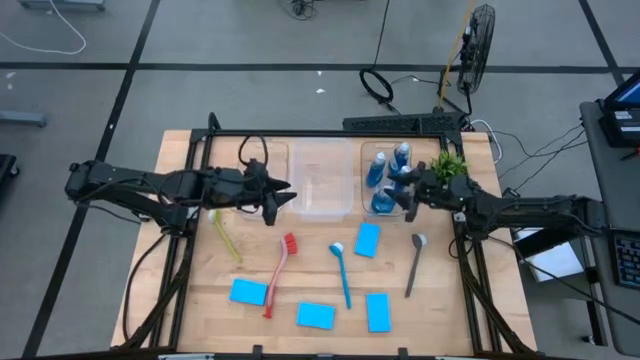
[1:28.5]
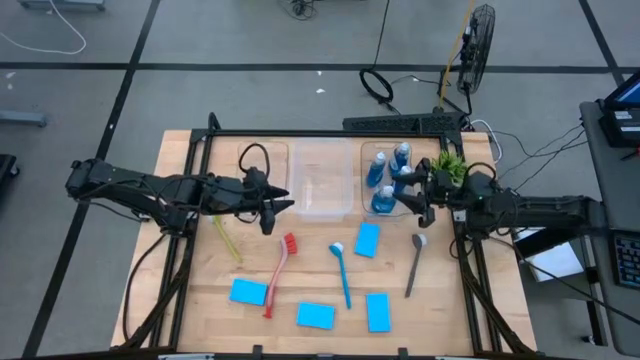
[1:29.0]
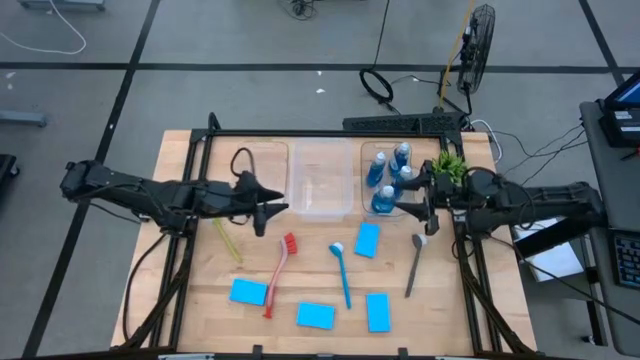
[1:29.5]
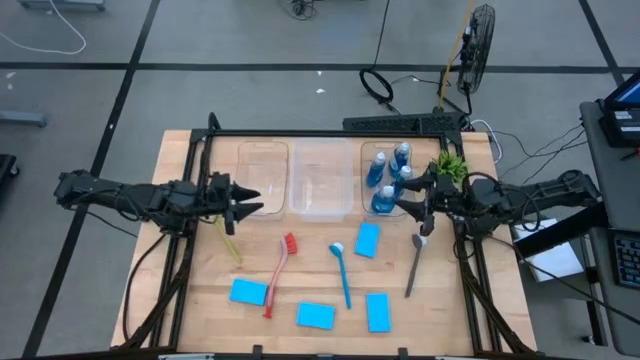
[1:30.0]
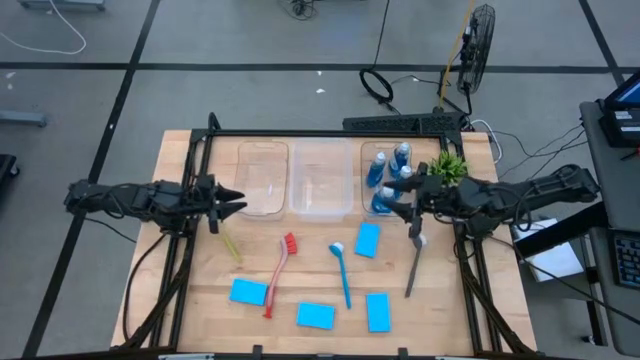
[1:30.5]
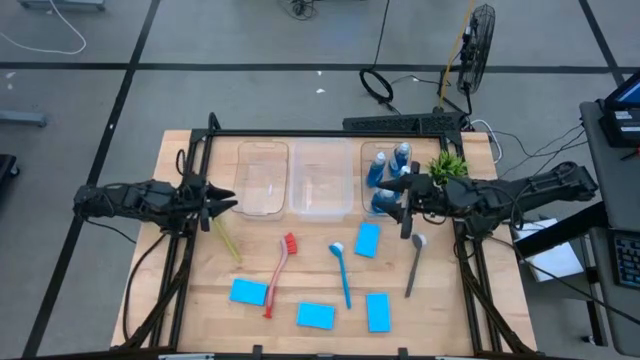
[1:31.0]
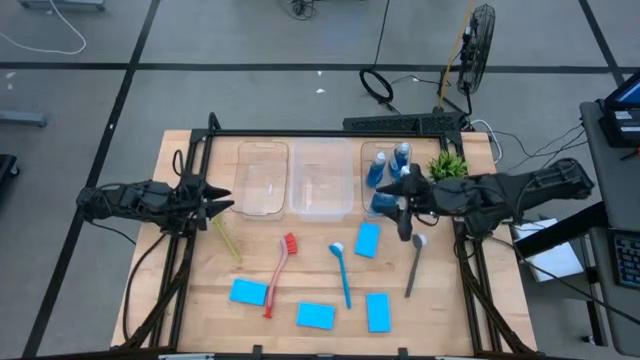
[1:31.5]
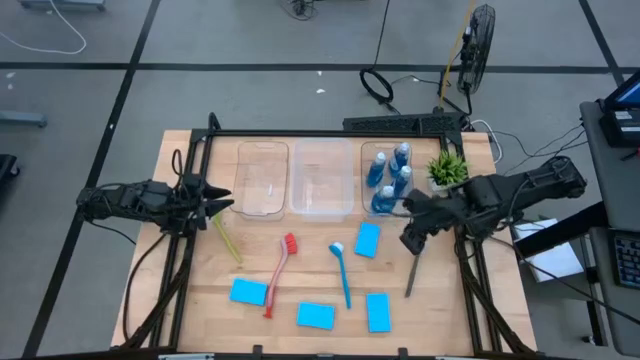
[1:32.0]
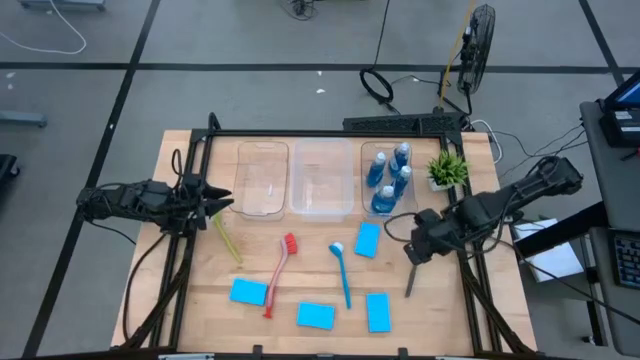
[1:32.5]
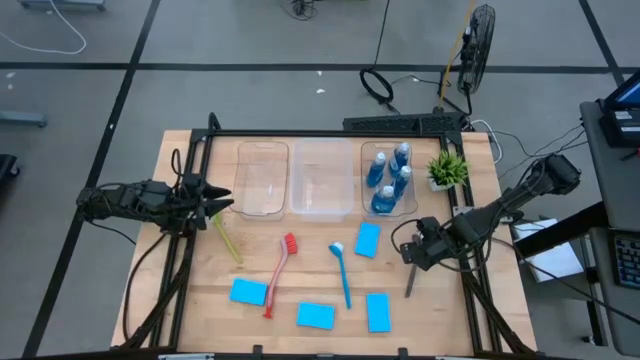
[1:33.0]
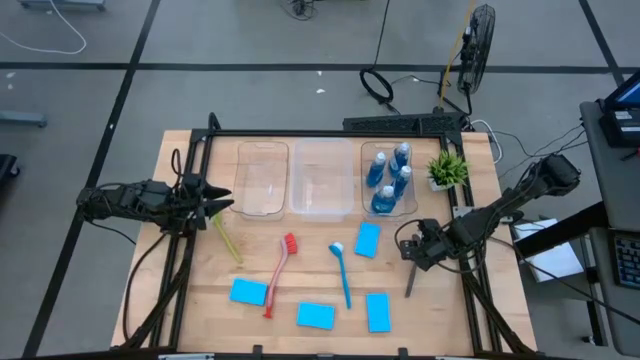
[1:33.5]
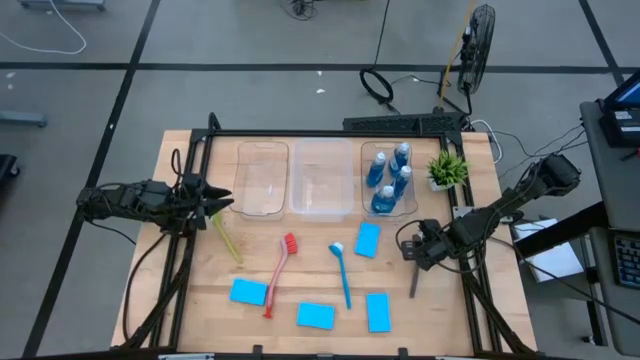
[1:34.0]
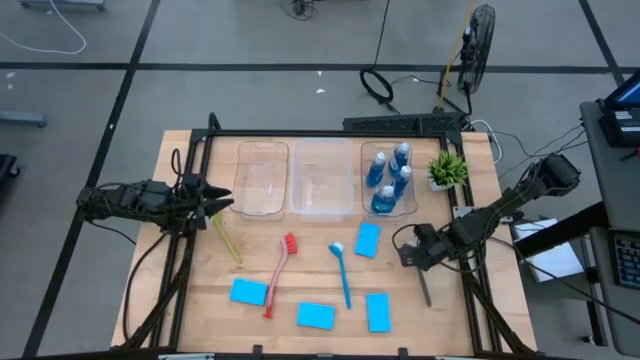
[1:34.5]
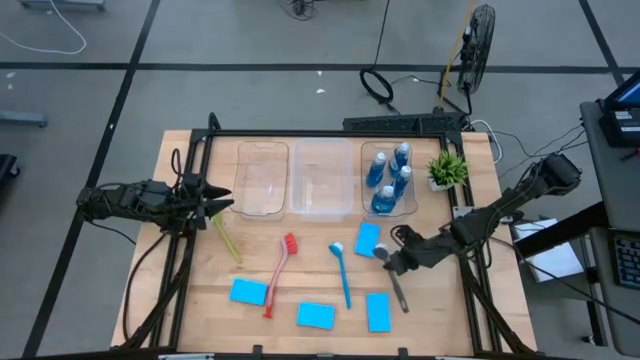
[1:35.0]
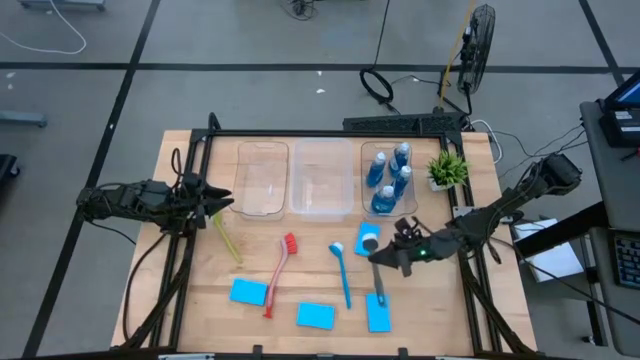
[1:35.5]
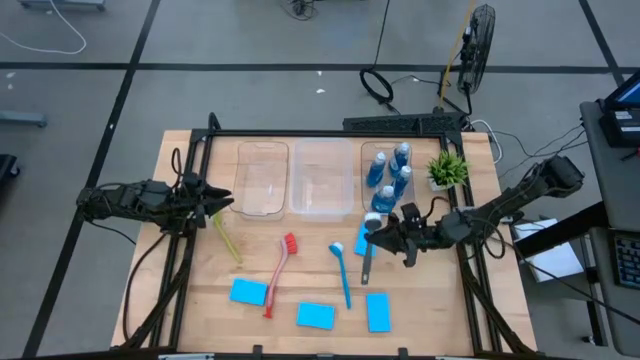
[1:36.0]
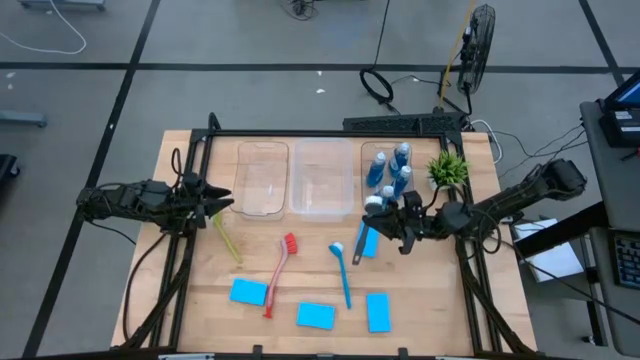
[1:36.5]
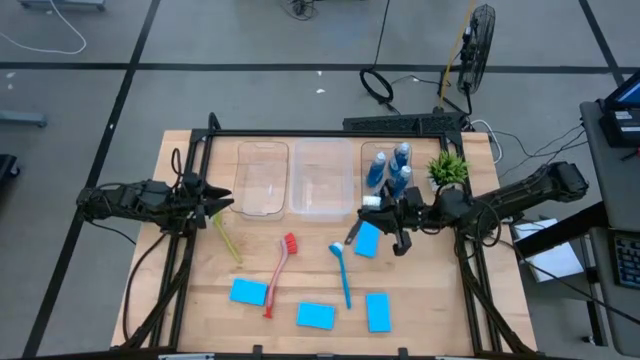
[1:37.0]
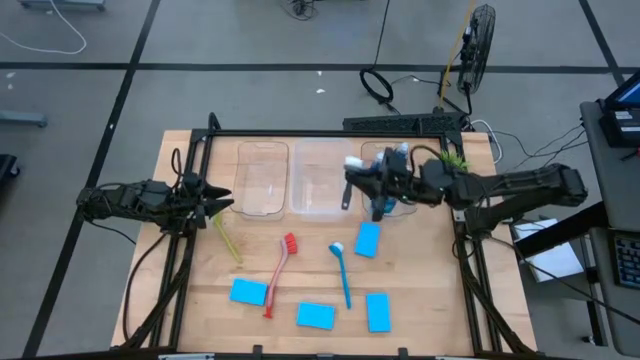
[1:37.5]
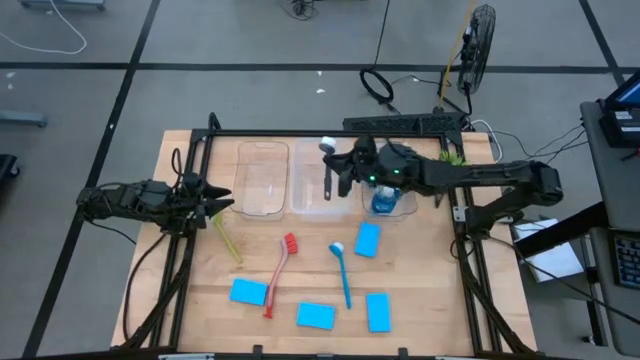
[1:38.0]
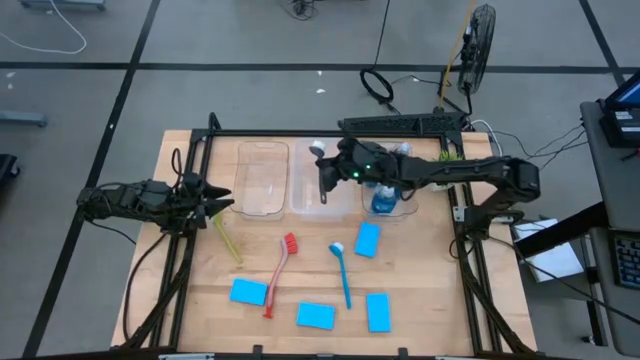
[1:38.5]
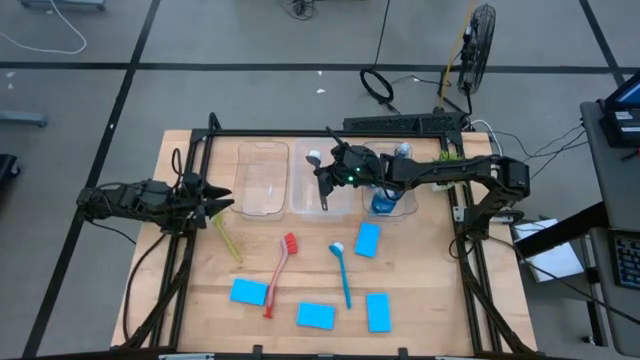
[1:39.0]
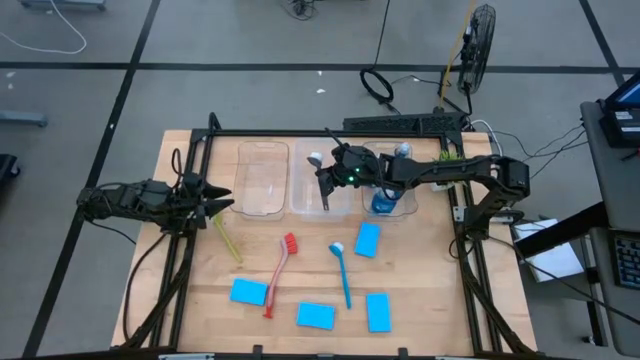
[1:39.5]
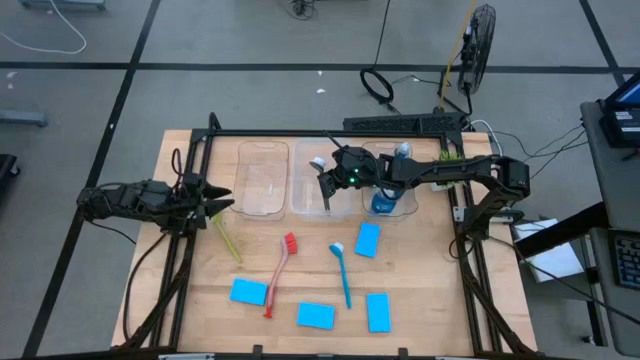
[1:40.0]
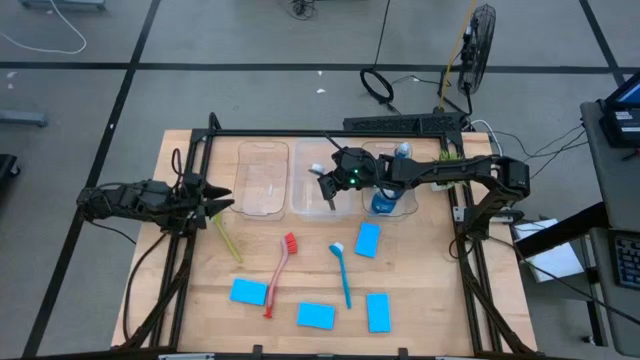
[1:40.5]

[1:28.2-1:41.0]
Task: Pick & Place Kitchen Sink Supplies
Put the black dishwashing brush into the transparent white bin

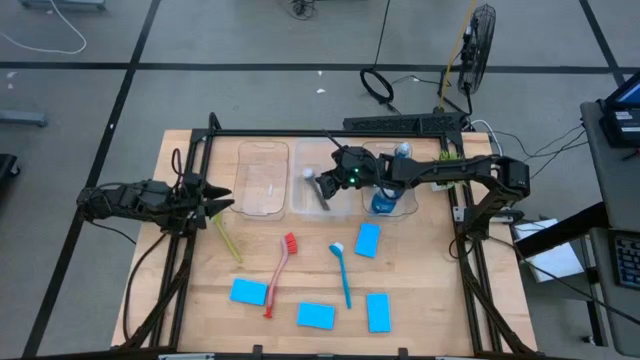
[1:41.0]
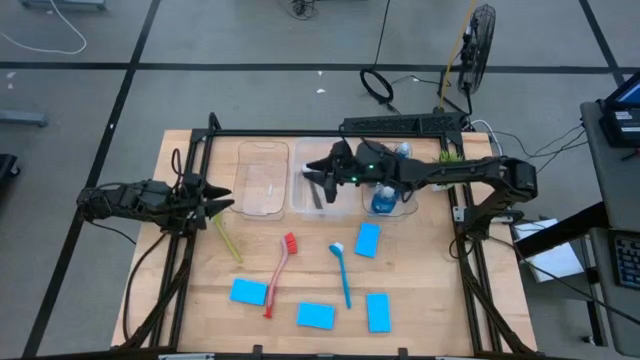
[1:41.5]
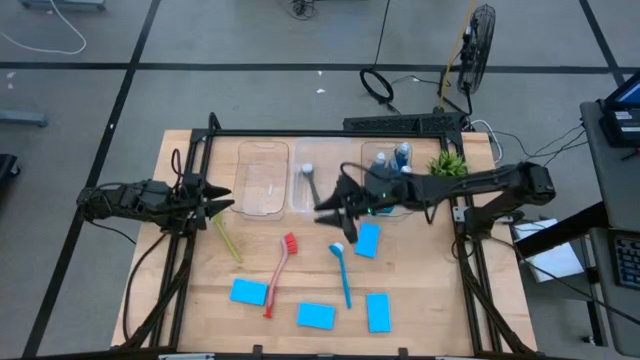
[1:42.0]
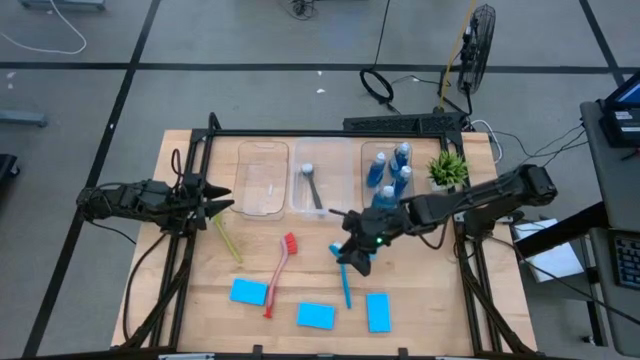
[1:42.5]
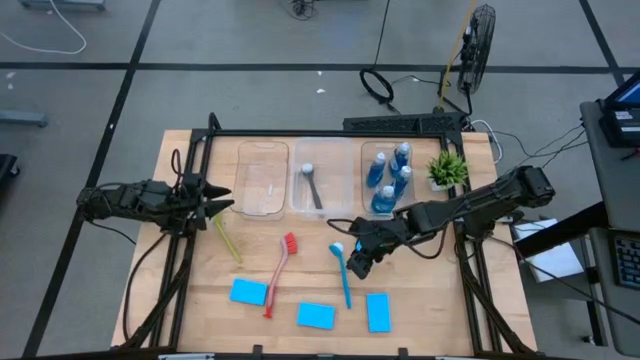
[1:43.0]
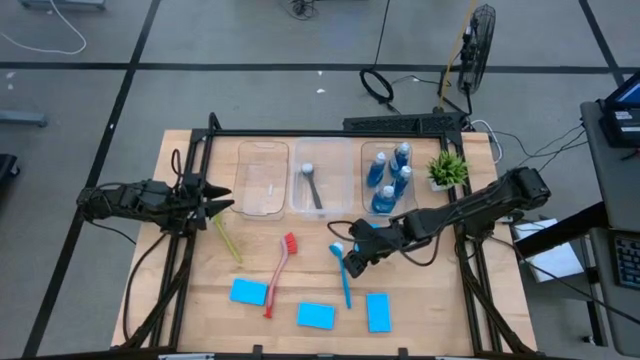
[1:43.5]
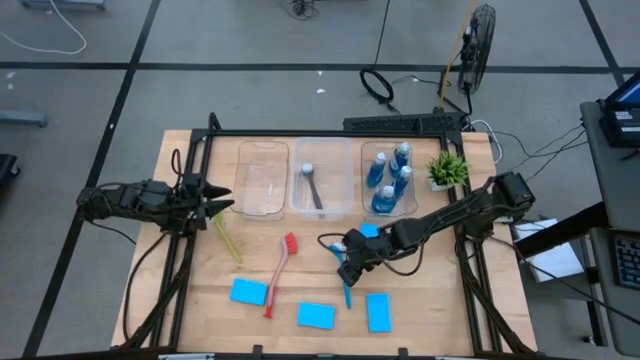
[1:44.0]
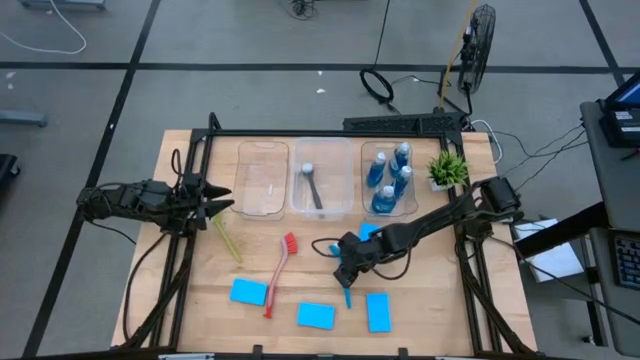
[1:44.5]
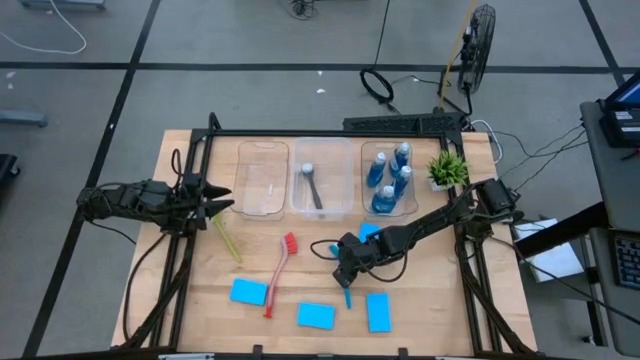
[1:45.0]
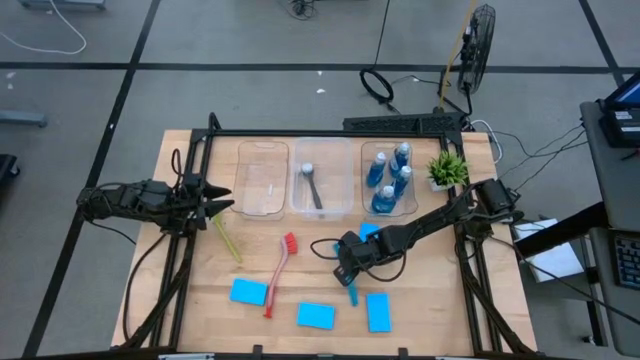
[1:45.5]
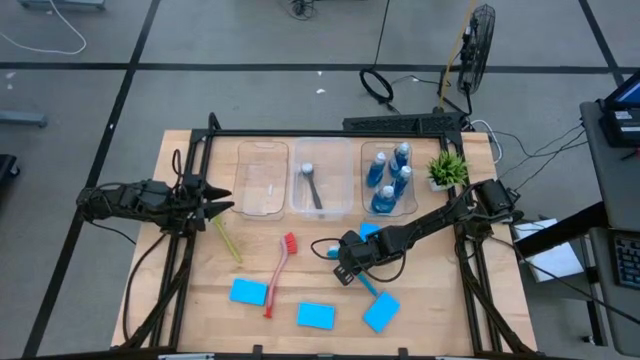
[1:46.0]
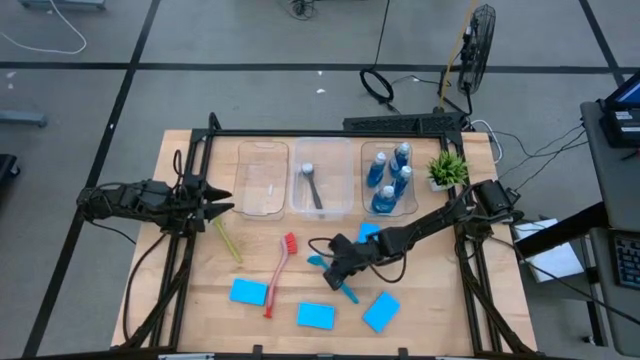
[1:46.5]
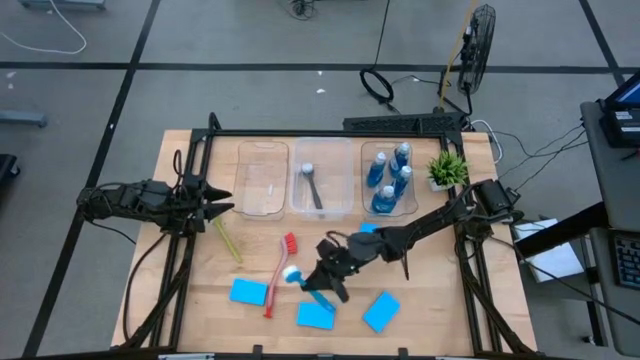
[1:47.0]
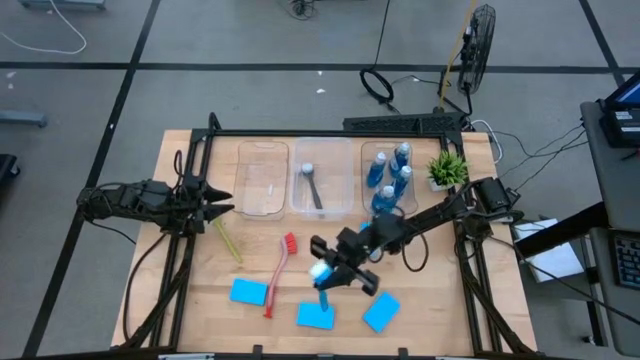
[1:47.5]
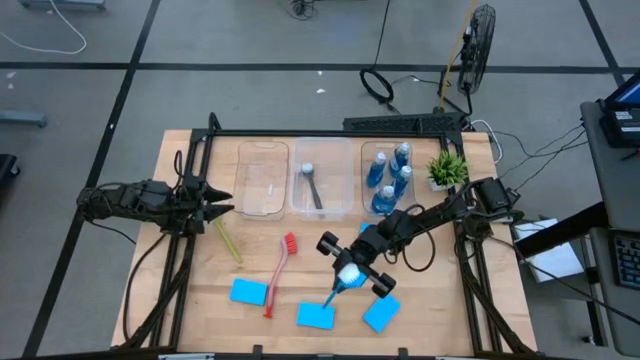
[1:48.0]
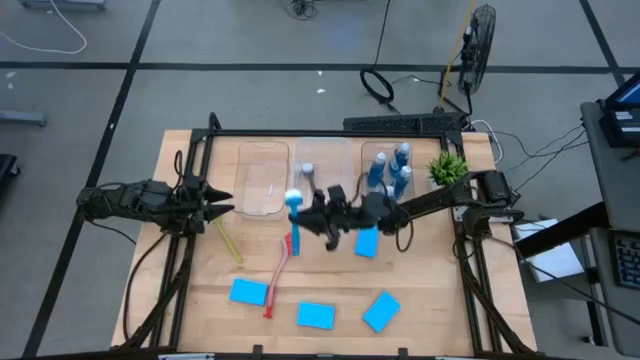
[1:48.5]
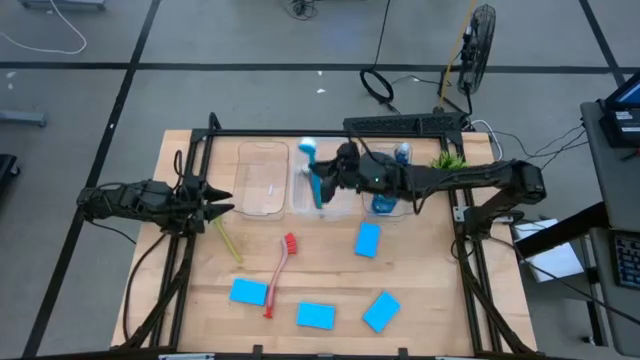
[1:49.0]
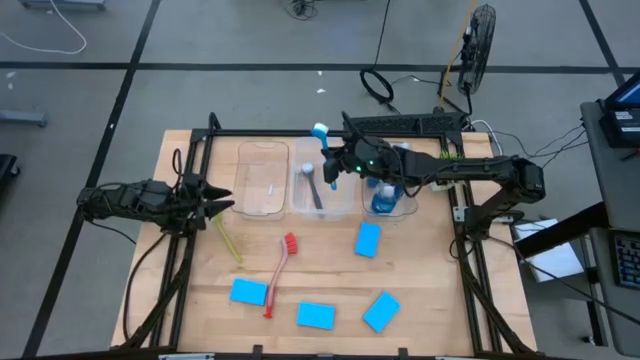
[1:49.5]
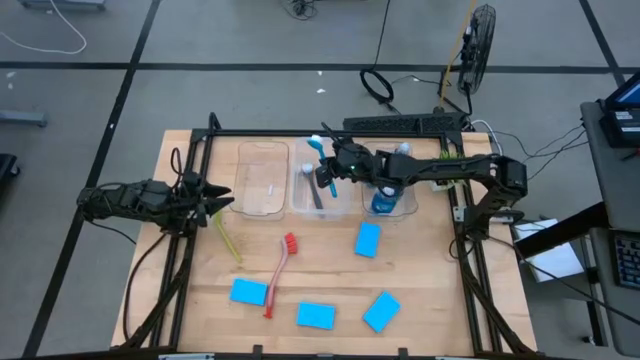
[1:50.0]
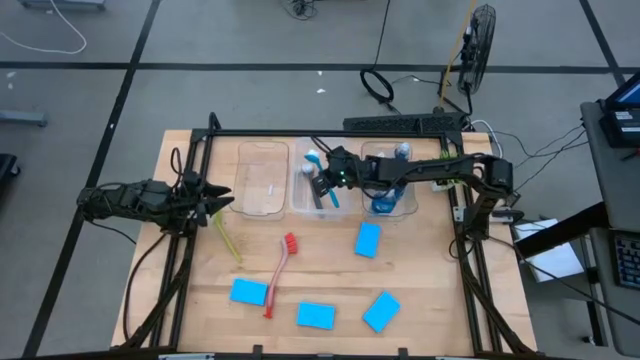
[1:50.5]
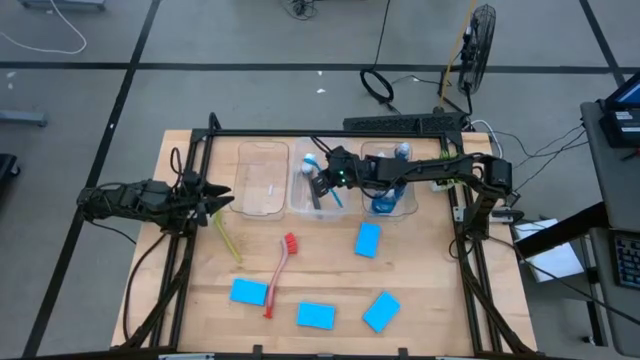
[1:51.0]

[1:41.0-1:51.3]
Put the blue dishwashing brush into the transparent white bin
